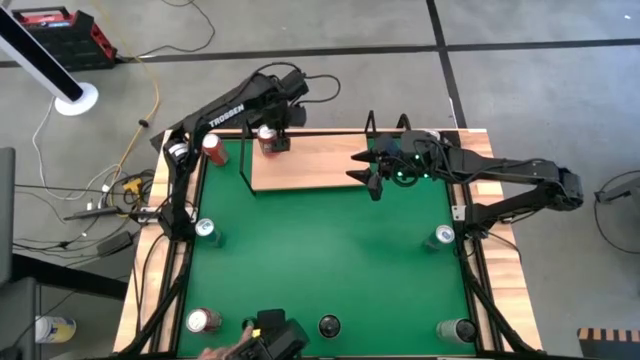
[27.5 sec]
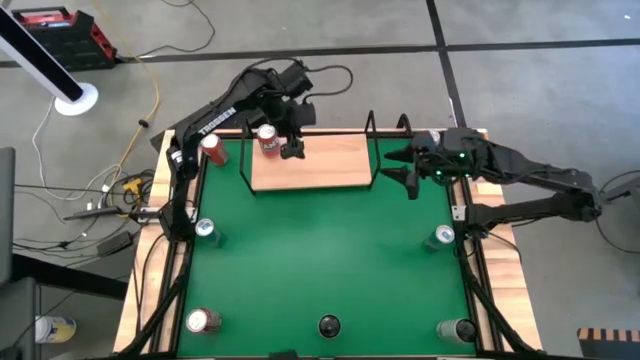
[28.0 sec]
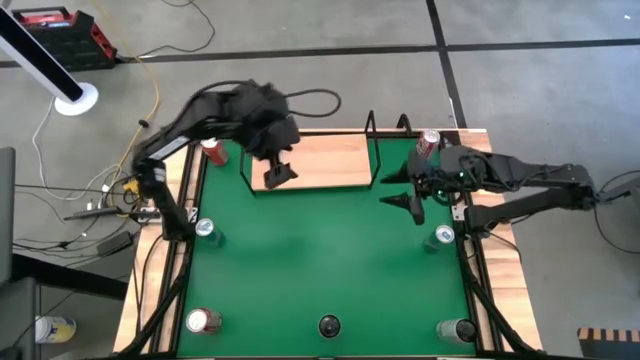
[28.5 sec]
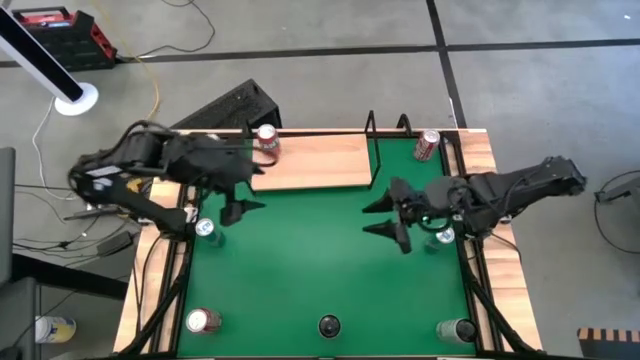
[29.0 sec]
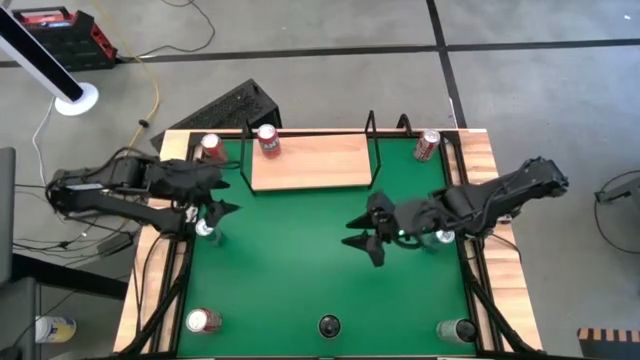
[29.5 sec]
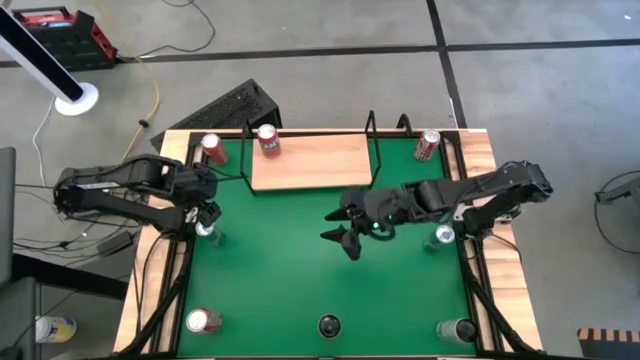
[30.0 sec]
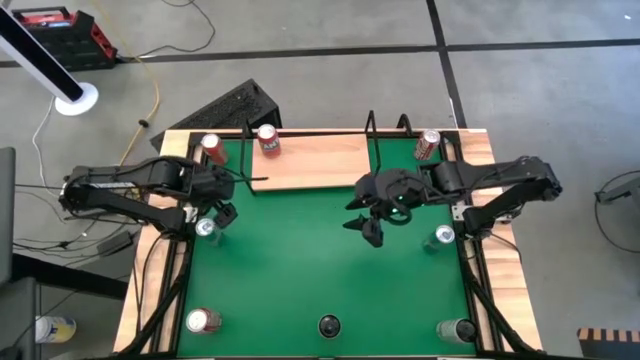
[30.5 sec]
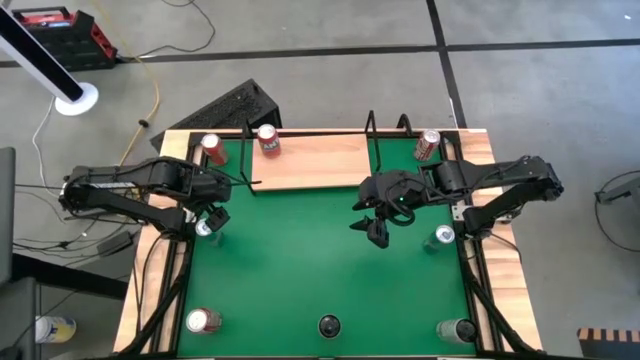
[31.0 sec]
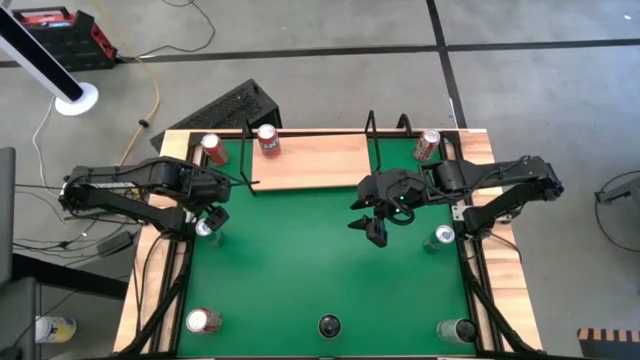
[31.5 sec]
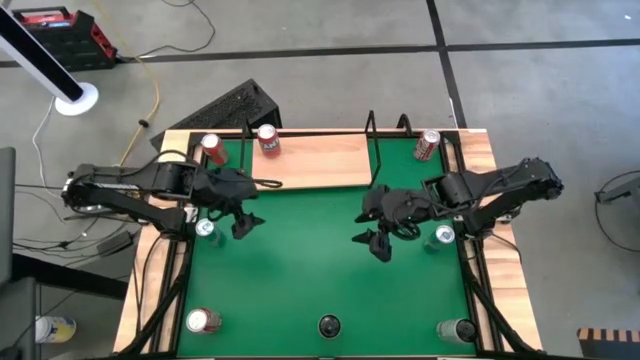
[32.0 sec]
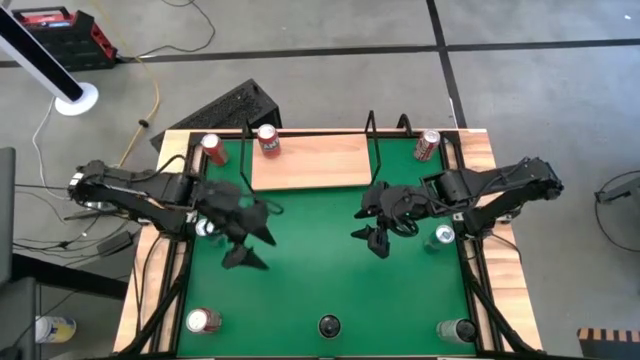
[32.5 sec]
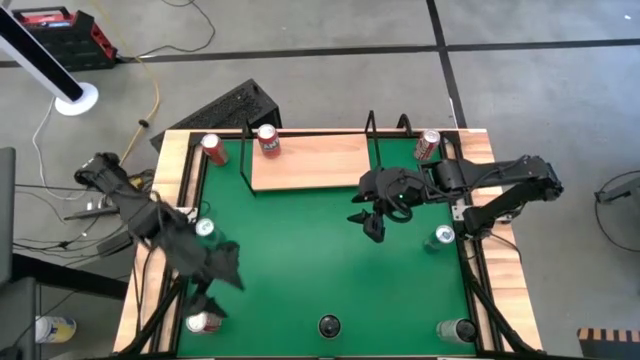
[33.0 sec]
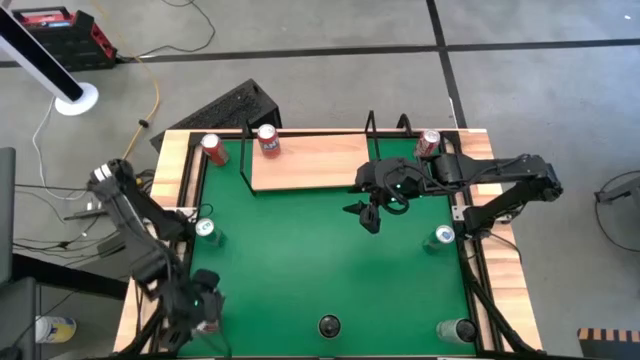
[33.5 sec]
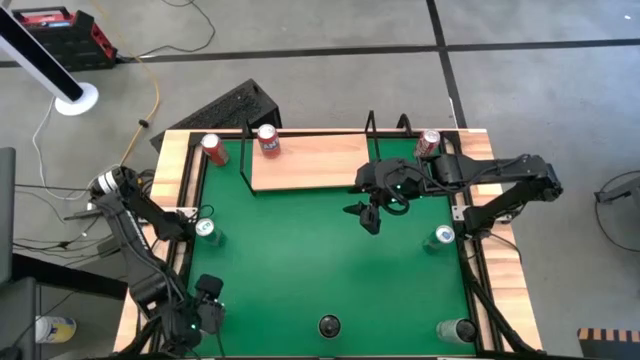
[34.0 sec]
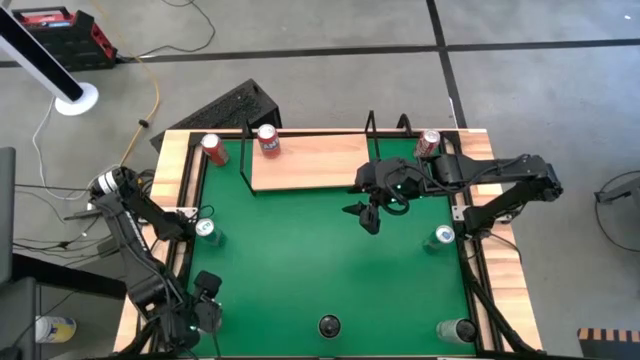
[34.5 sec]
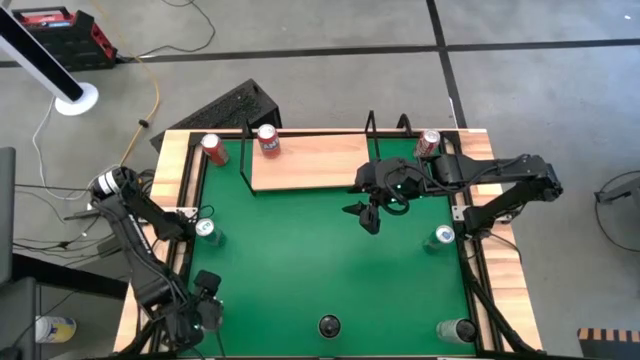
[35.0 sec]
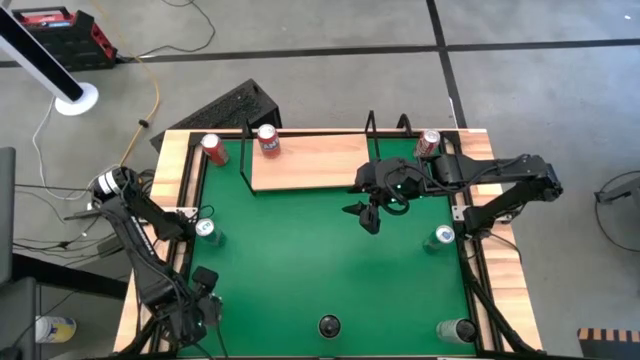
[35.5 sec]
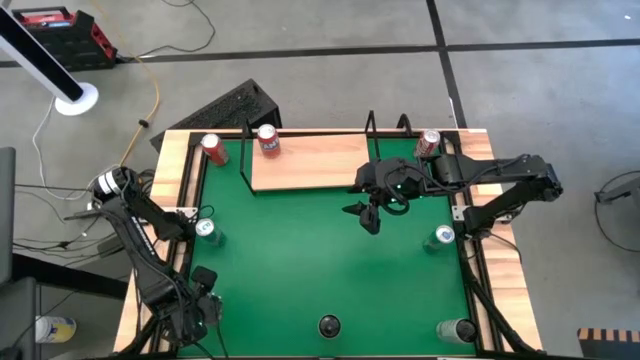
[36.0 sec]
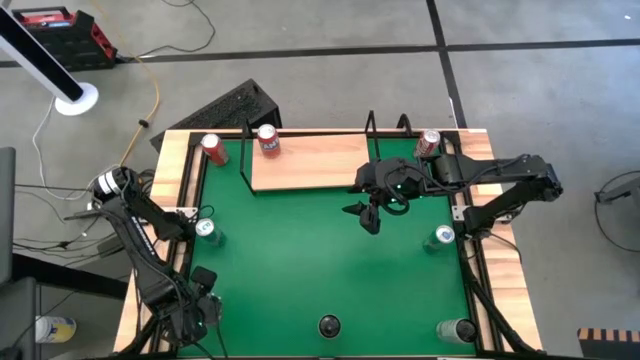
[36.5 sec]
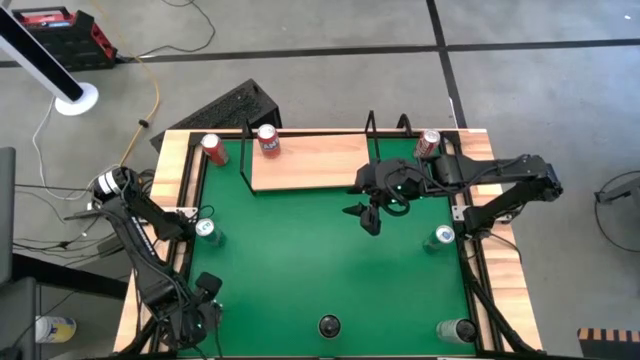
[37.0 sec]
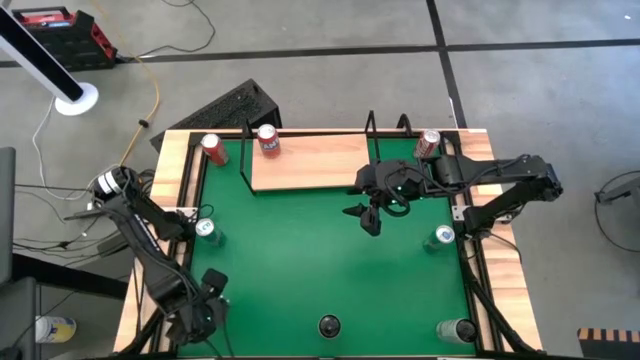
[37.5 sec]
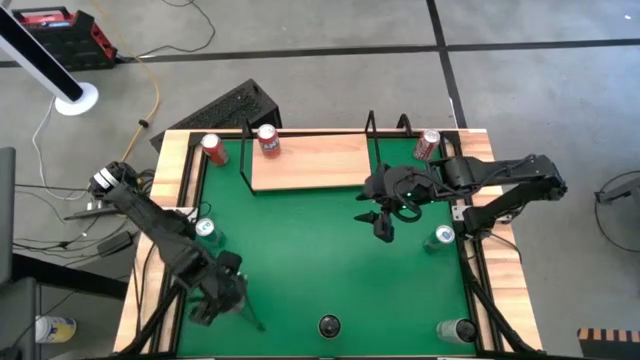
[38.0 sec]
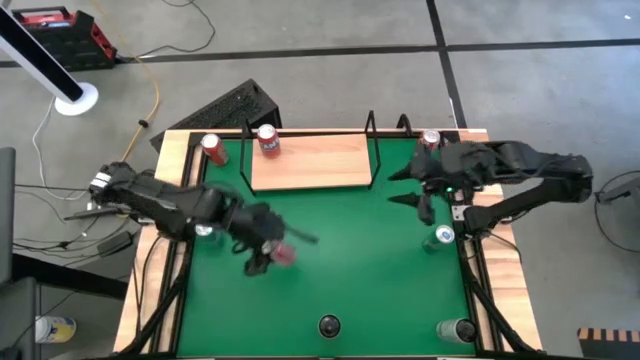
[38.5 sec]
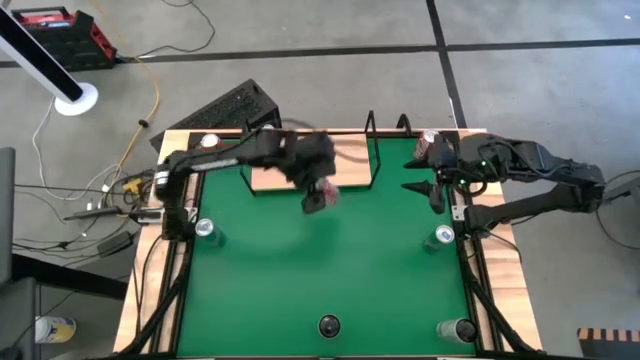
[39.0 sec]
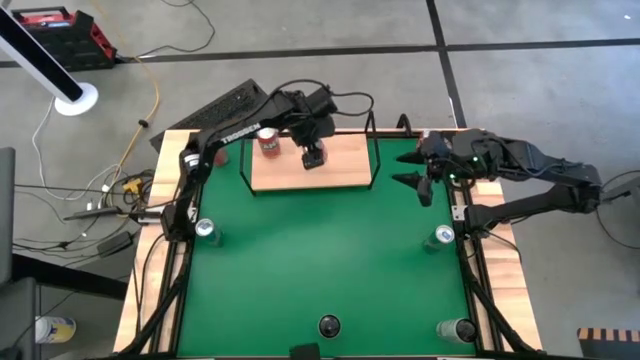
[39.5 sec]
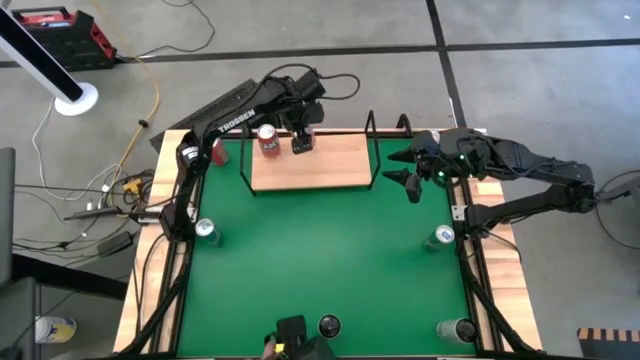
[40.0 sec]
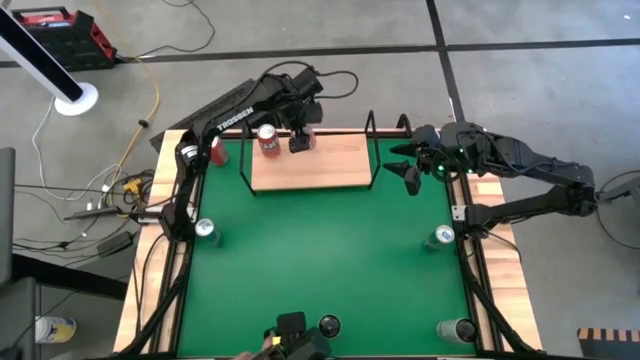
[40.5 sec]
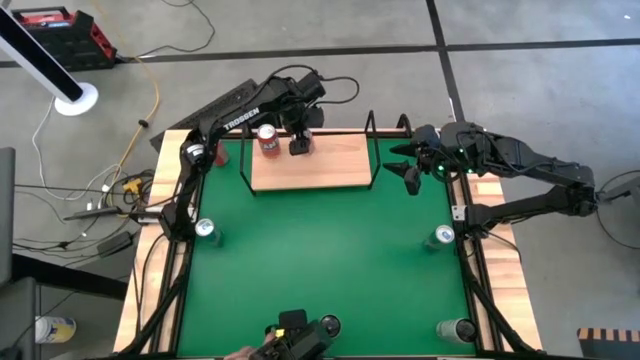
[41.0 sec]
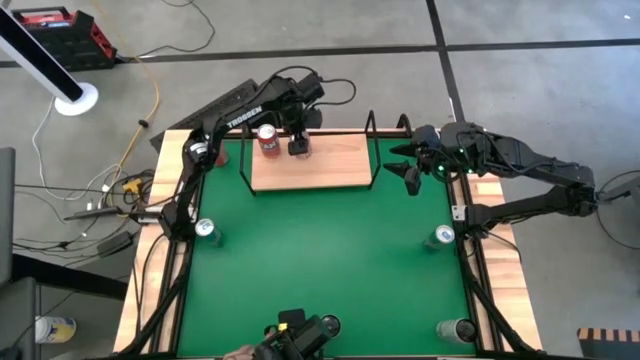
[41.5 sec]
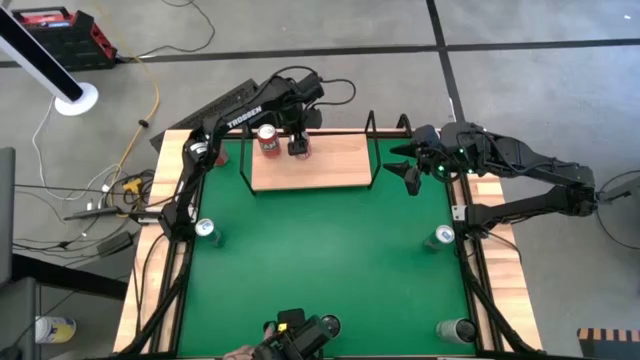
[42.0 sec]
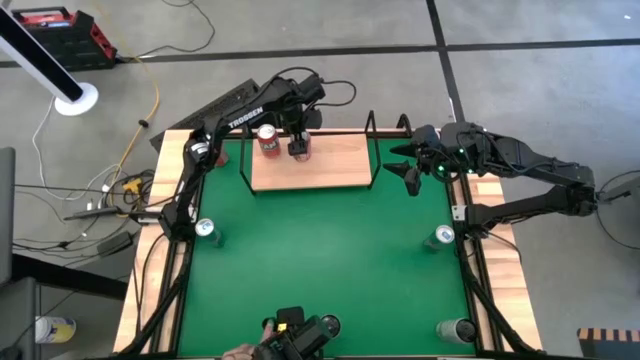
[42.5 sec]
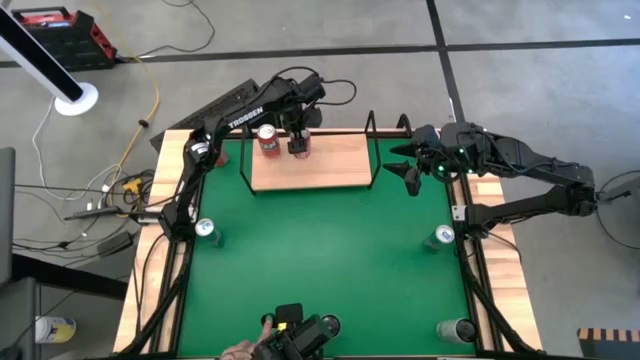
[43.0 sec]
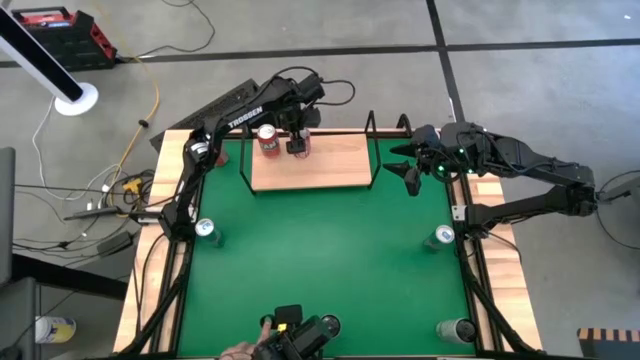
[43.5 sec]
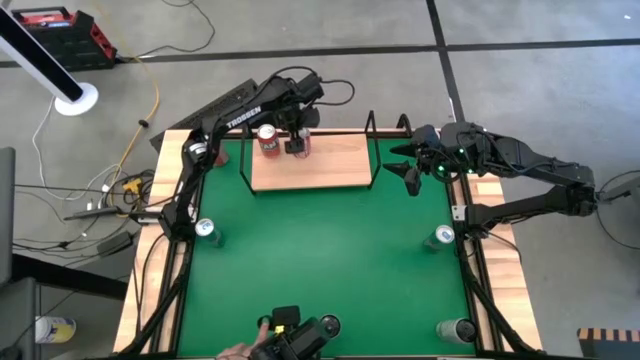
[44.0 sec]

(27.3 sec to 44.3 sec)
Task: Place canned beverage on shelf
Put the left bottom red soda can on the shelf

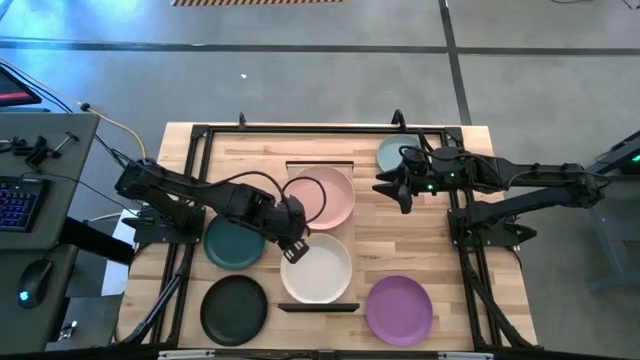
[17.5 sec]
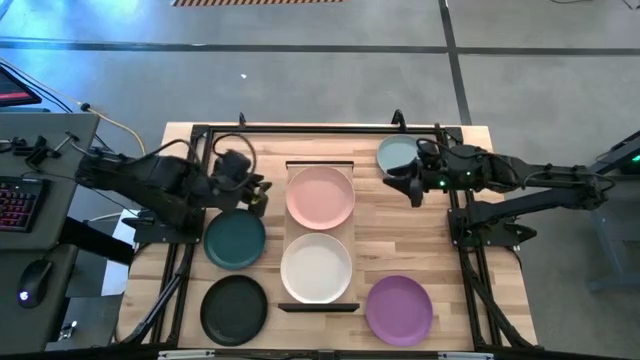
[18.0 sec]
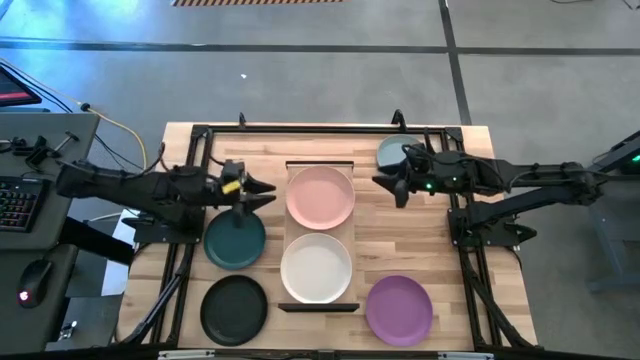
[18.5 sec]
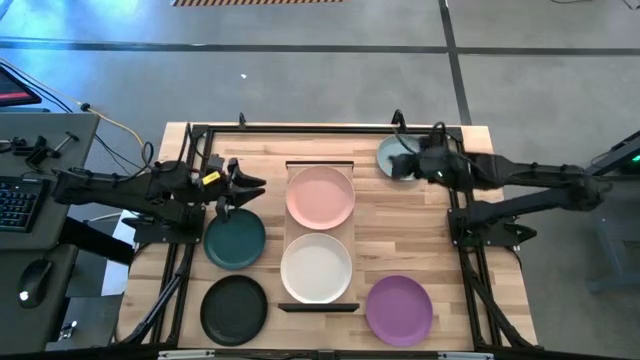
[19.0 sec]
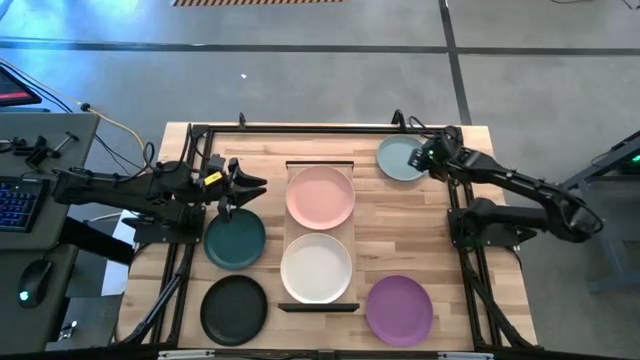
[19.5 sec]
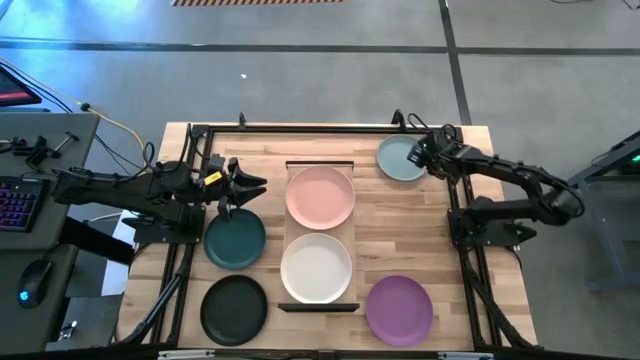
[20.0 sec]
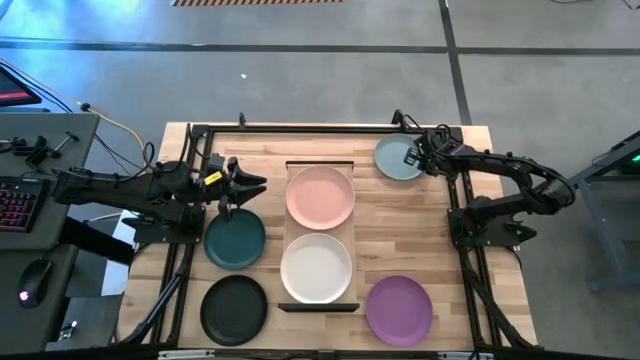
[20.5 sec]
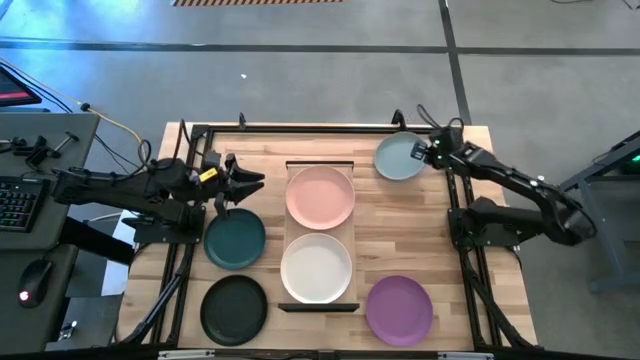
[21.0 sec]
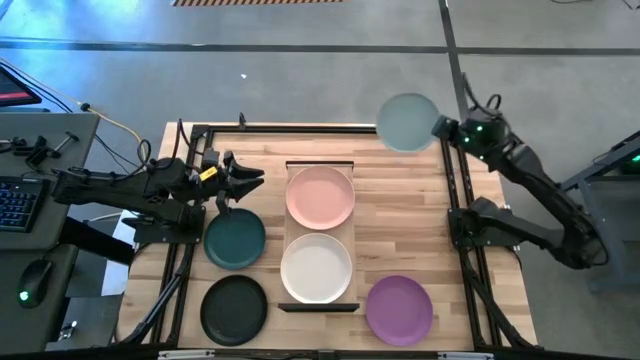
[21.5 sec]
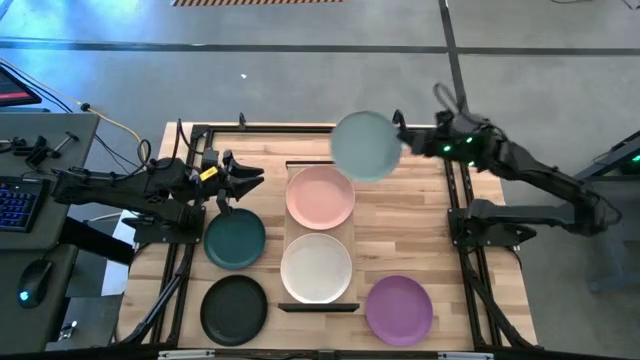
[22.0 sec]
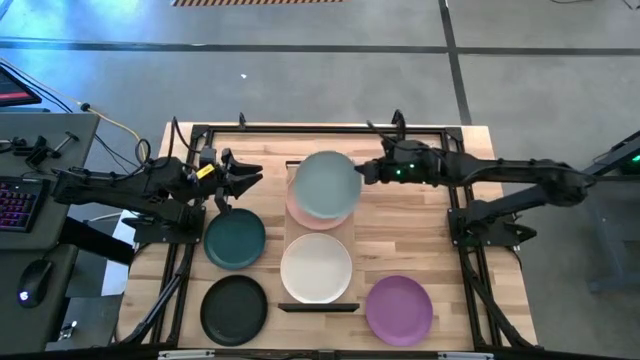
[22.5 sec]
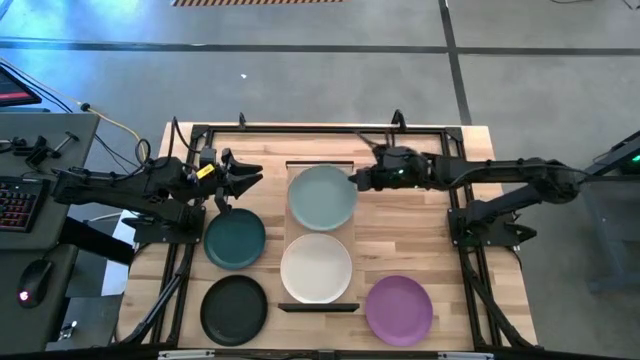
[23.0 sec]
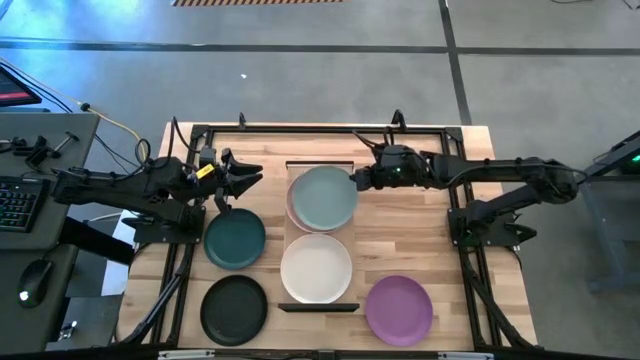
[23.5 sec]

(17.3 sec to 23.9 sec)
Task: Place and stack plates onto a shelf
Stack the light blue plate on top of the pink plate
